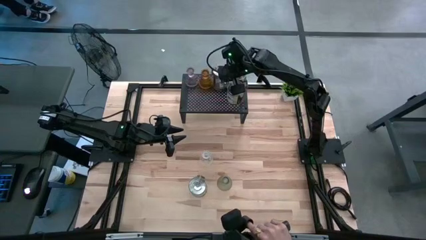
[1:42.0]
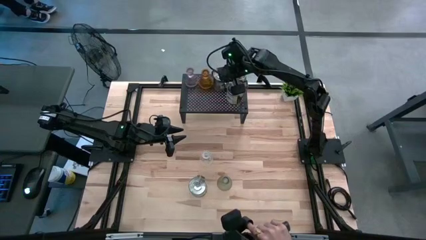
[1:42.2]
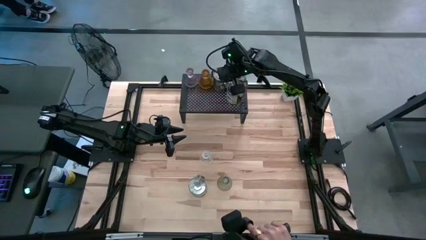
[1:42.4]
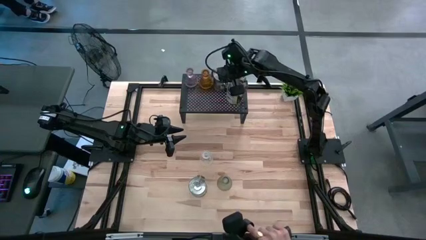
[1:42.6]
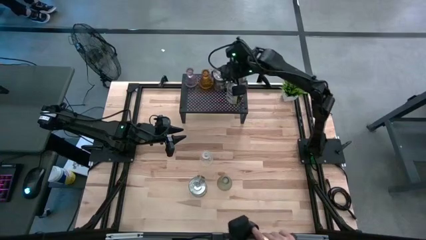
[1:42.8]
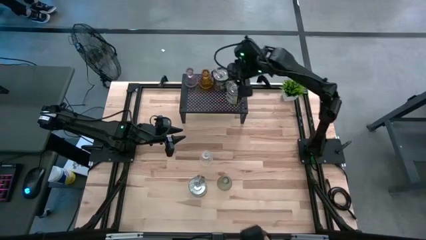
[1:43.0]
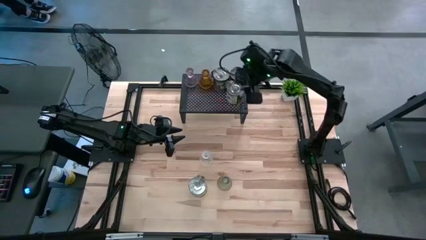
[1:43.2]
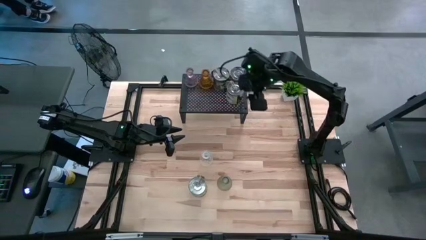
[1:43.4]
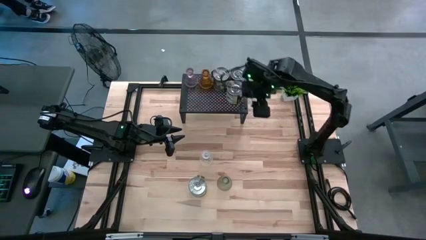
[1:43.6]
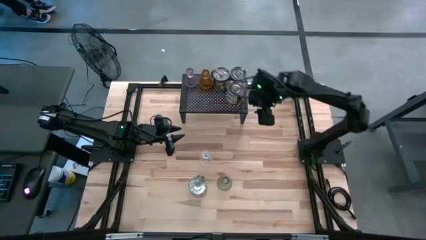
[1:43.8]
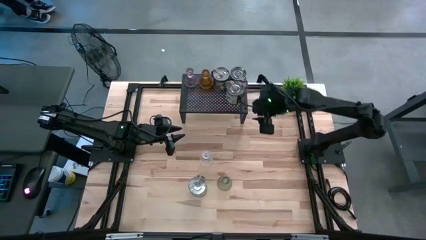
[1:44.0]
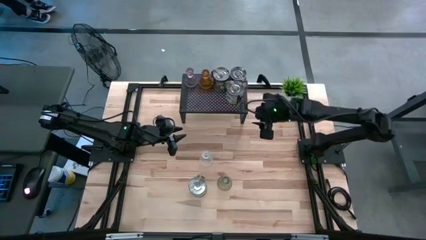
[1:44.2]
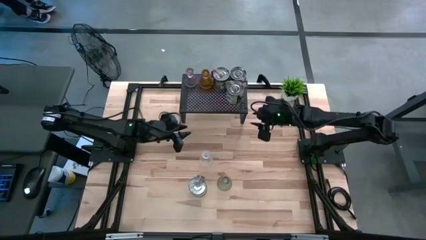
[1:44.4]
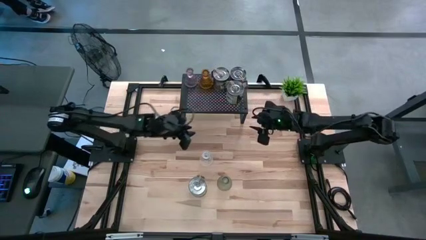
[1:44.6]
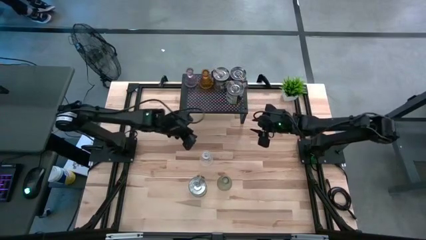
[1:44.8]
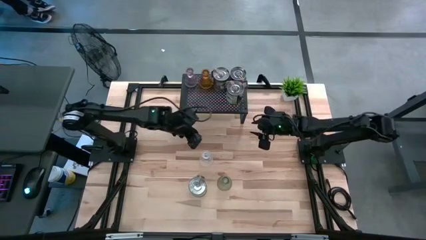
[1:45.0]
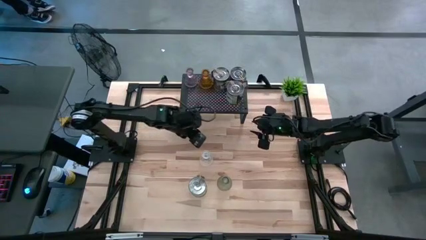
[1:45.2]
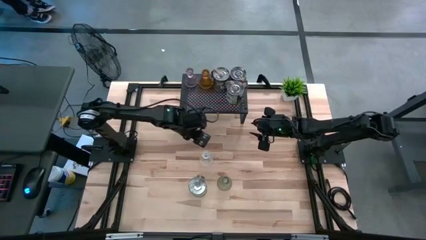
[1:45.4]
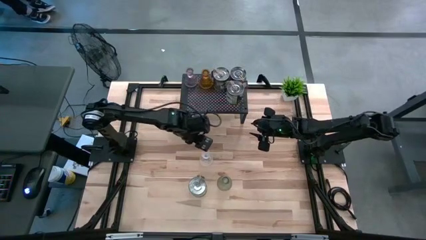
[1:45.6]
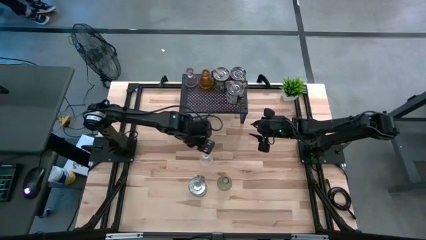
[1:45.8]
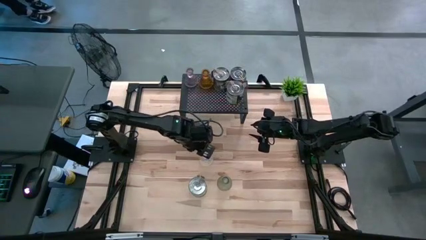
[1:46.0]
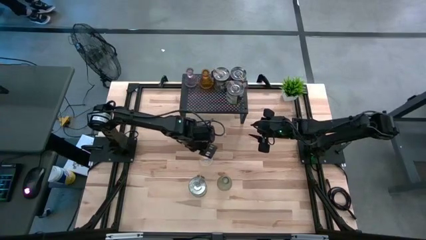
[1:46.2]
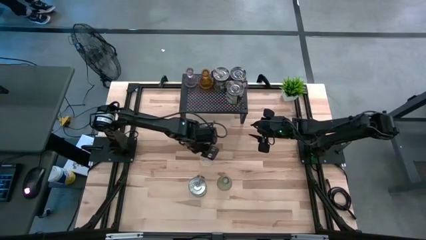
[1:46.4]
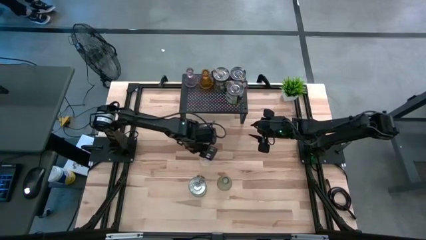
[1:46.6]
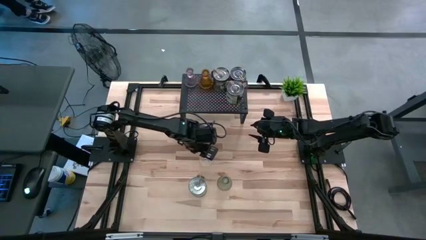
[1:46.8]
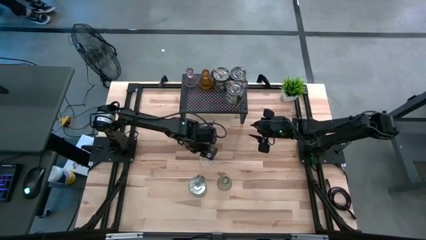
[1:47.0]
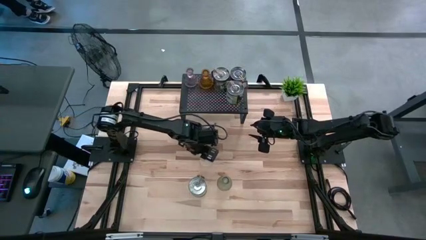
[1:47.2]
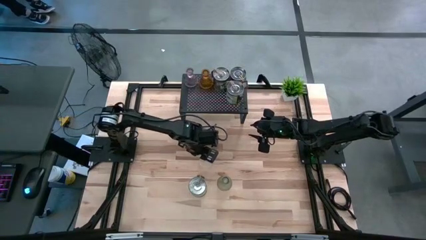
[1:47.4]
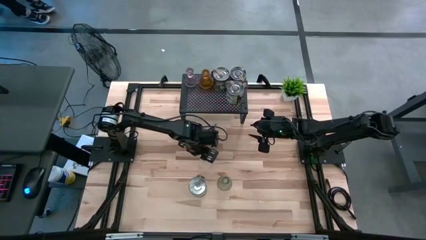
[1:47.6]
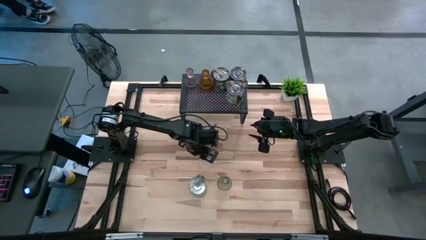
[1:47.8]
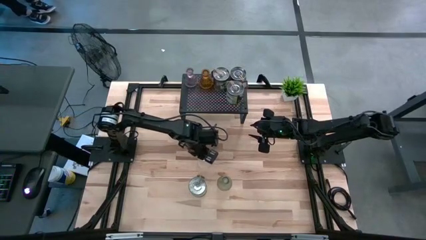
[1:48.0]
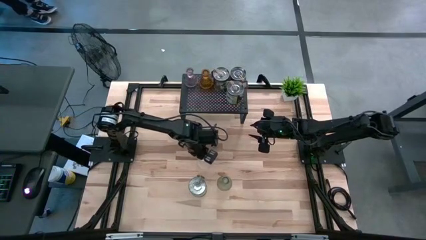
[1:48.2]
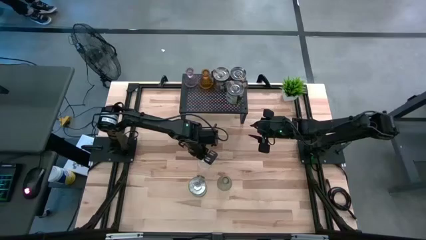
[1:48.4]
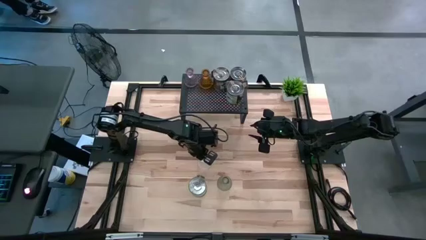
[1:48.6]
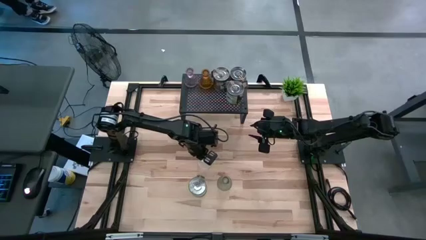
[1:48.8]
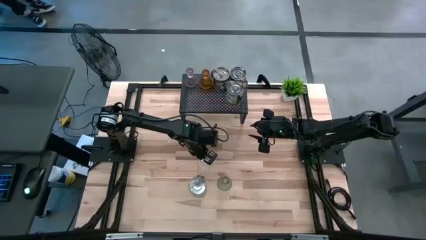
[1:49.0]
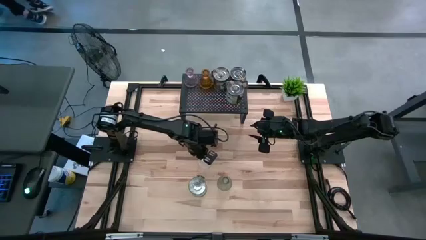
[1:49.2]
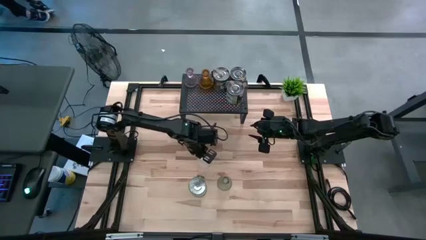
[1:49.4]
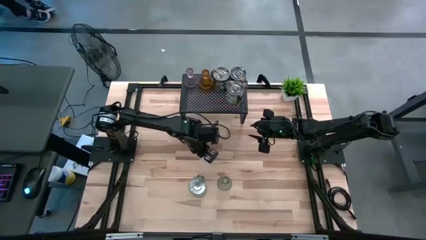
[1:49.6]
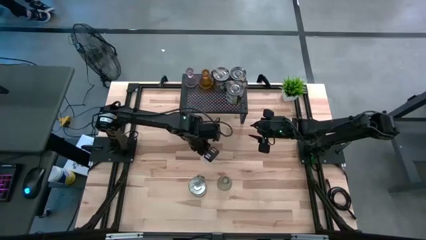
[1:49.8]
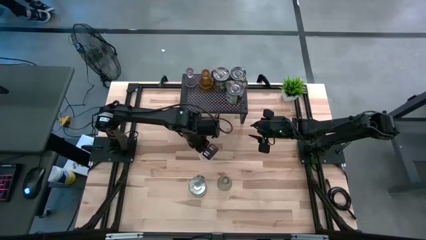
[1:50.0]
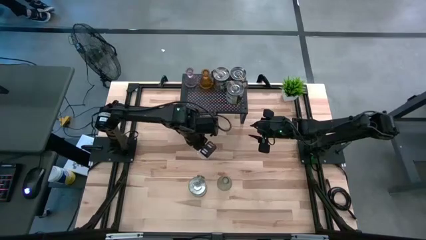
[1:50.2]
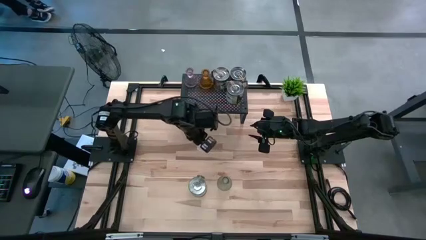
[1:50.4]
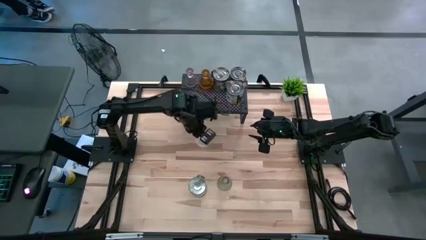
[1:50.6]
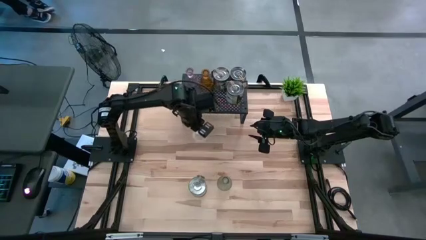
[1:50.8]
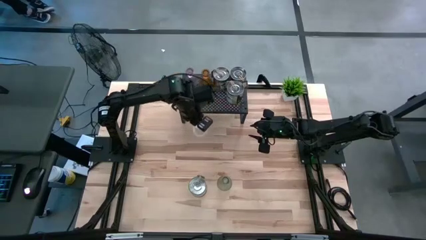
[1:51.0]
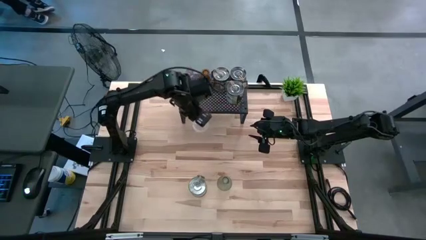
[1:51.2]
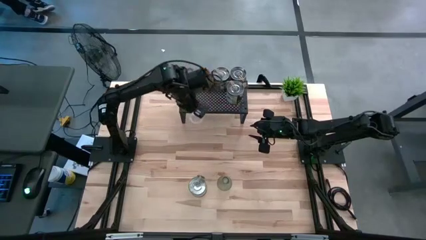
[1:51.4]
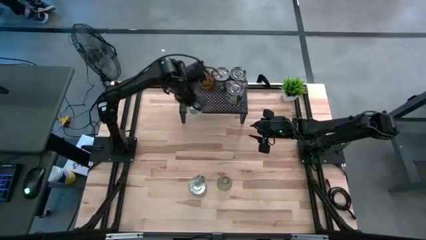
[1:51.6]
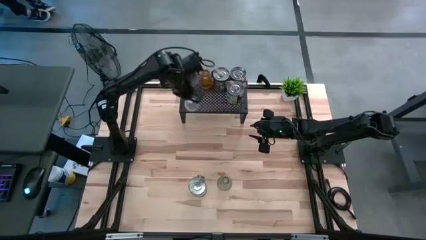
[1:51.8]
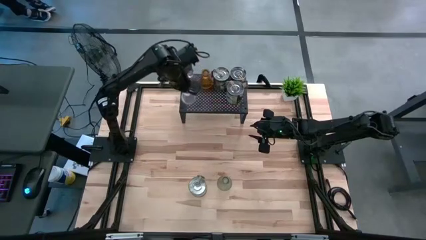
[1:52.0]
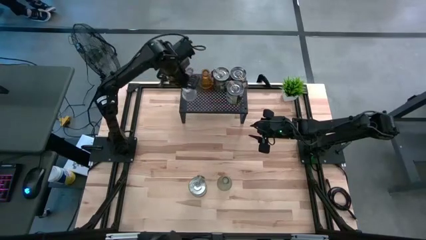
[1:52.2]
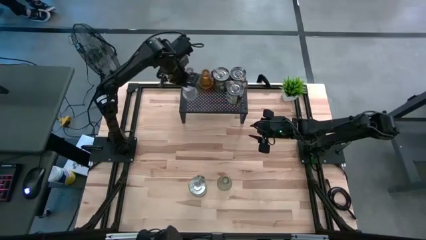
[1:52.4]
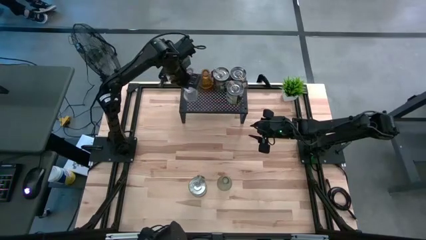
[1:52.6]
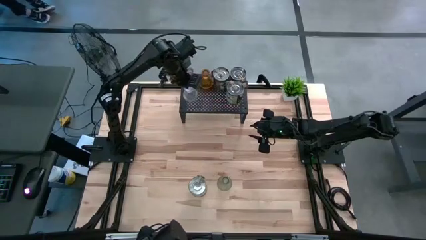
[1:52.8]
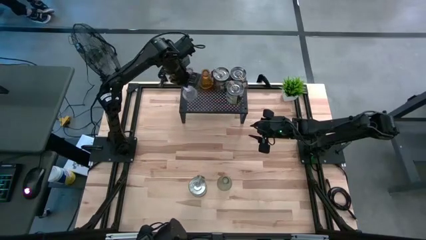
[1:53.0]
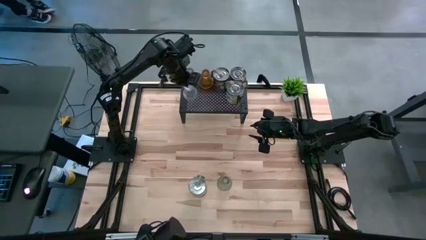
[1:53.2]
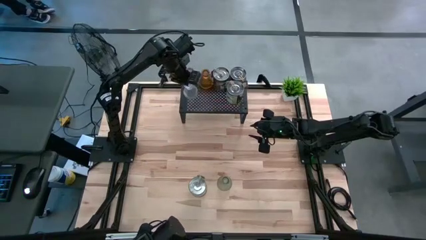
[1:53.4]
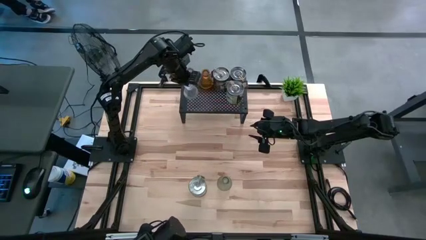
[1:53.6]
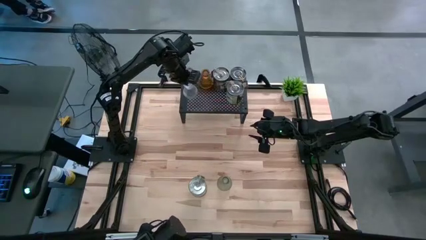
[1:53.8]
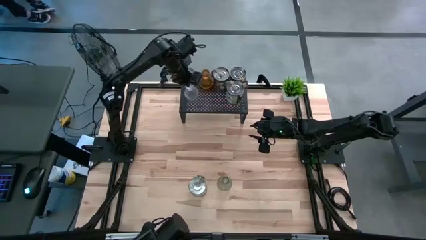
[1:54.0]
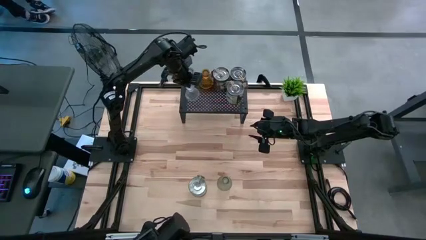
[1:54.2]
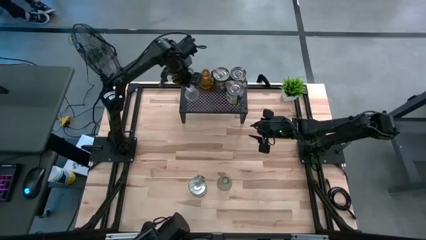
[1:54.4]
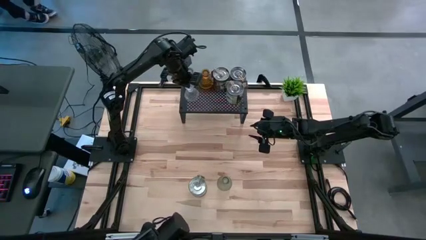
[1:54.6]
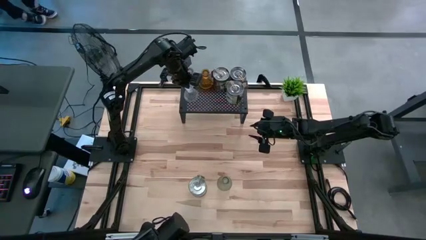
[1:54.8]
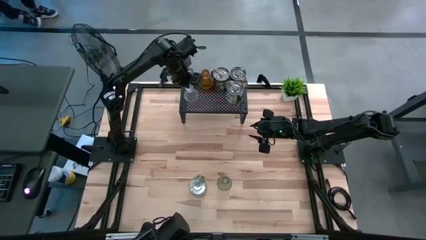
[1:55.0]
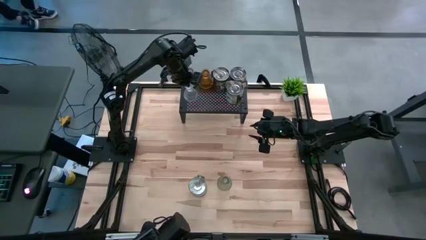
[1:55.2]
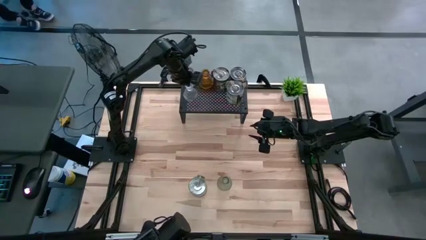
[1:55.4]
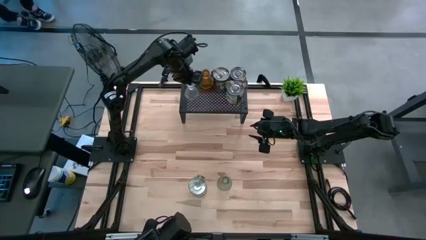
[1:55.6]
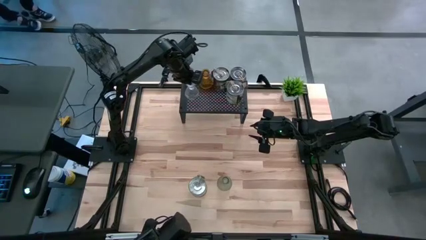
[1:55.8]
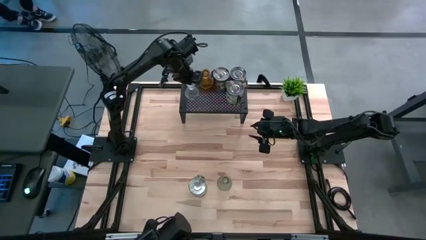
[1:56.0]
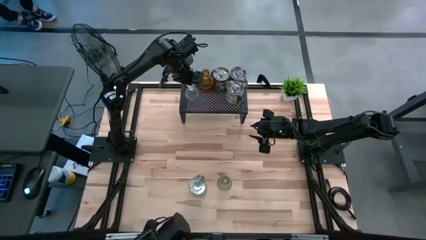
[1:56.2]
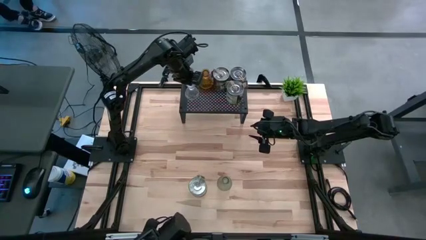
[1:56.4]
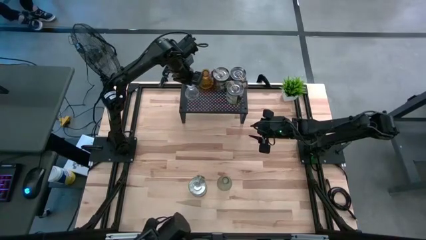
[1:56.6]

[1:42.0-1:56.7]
Task: Pick & Place candle stick holders
Put the transparent glass candlestick on the shelf aligned with the other candlesticks
